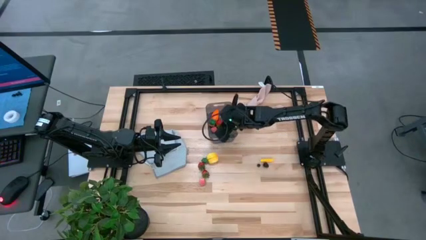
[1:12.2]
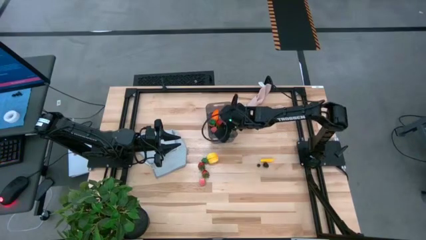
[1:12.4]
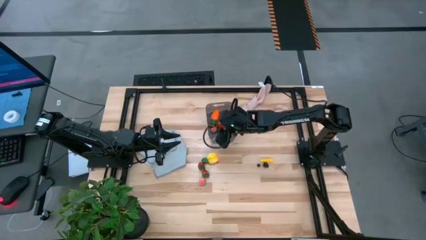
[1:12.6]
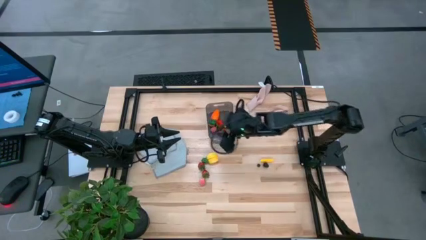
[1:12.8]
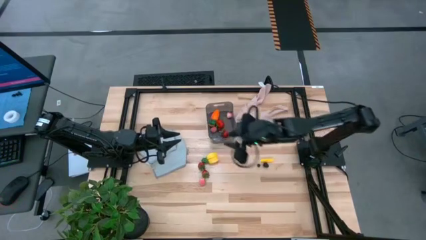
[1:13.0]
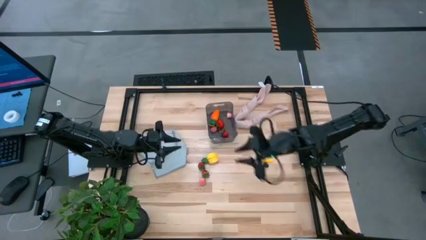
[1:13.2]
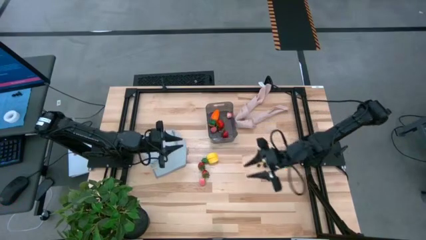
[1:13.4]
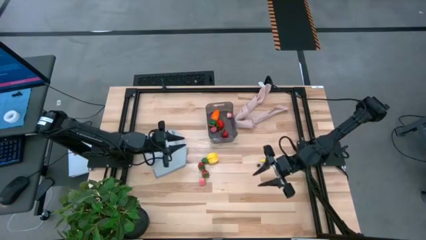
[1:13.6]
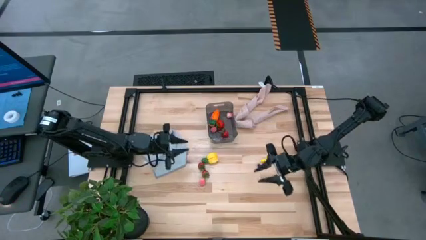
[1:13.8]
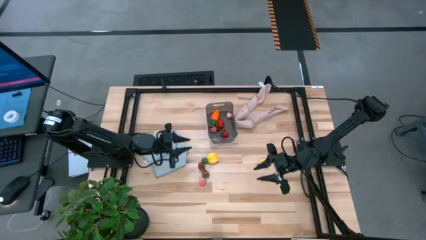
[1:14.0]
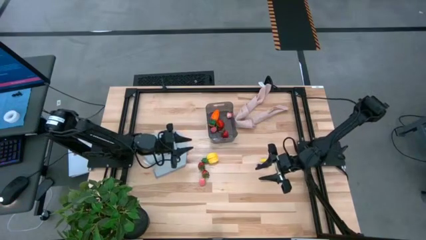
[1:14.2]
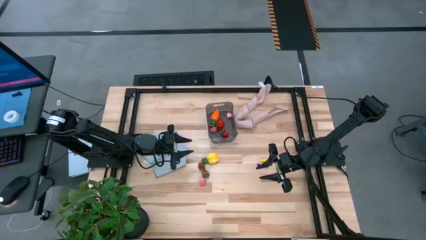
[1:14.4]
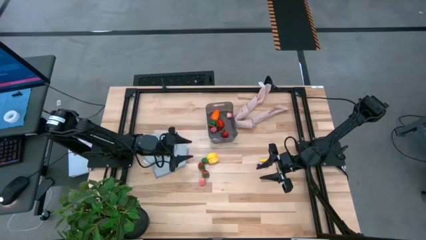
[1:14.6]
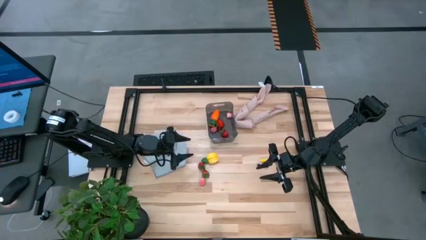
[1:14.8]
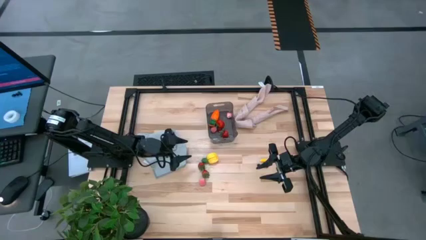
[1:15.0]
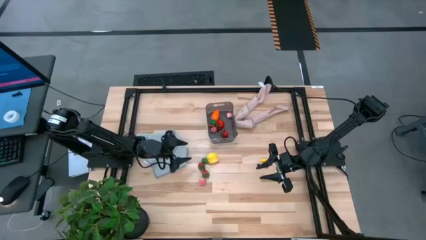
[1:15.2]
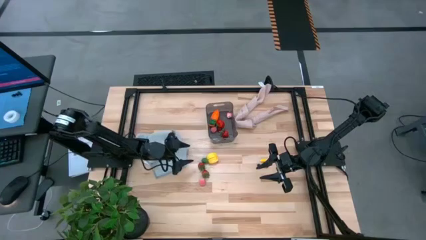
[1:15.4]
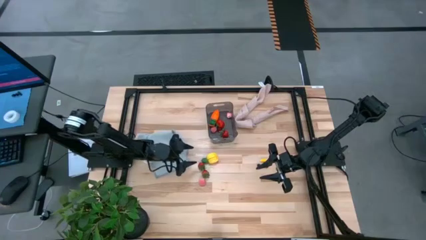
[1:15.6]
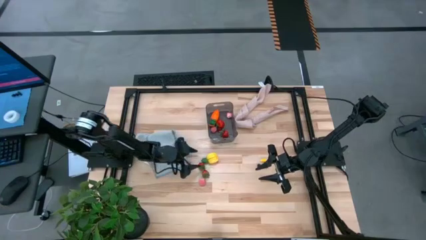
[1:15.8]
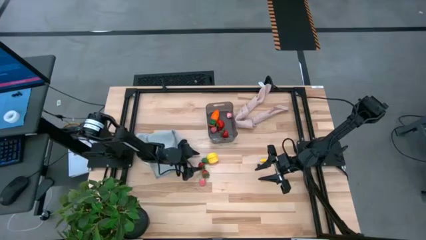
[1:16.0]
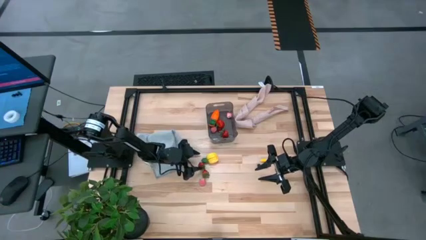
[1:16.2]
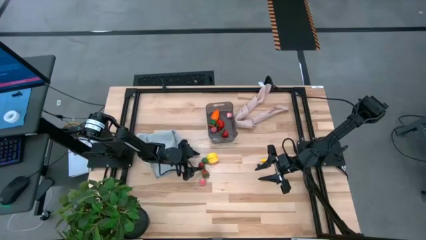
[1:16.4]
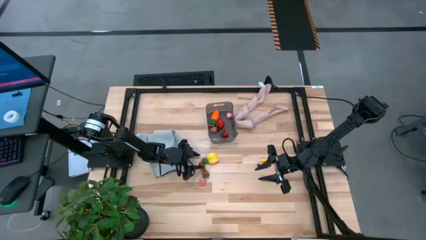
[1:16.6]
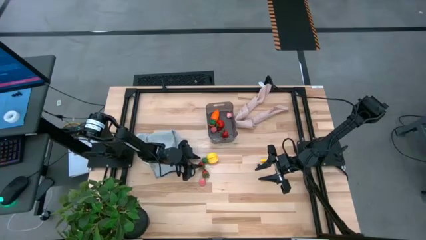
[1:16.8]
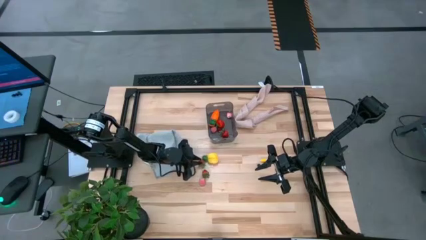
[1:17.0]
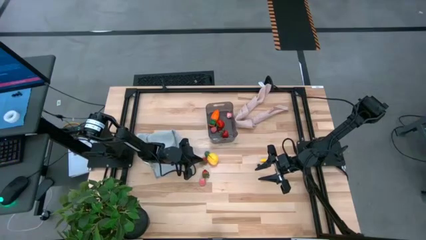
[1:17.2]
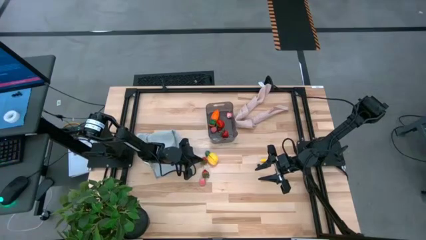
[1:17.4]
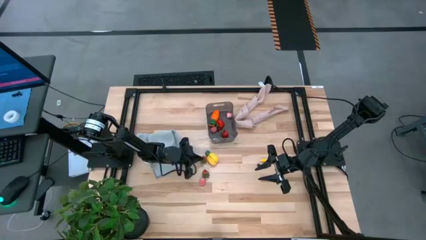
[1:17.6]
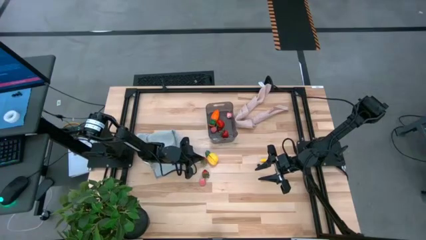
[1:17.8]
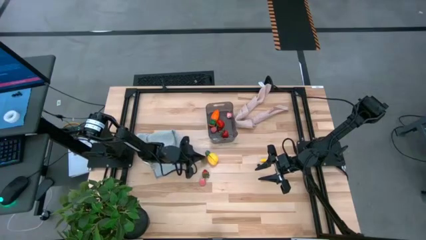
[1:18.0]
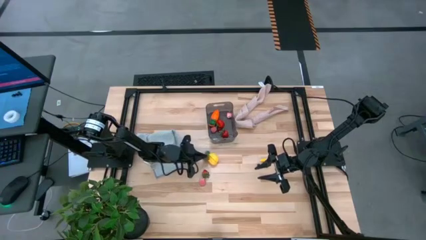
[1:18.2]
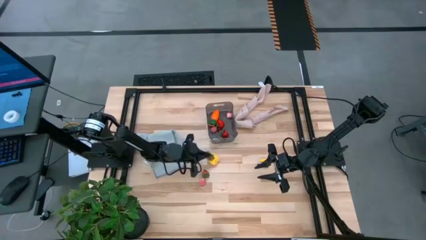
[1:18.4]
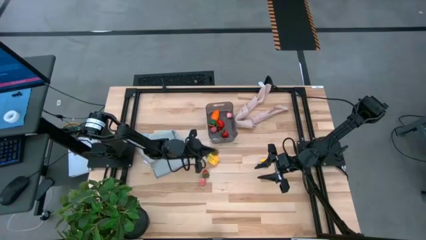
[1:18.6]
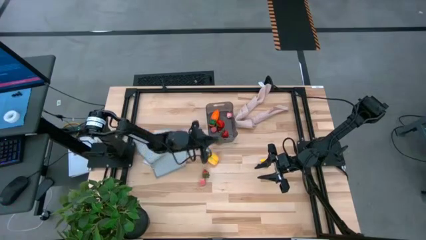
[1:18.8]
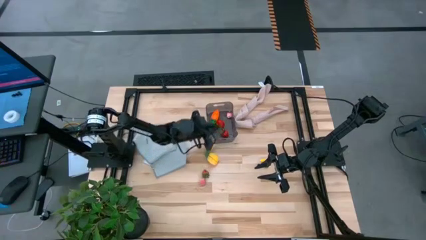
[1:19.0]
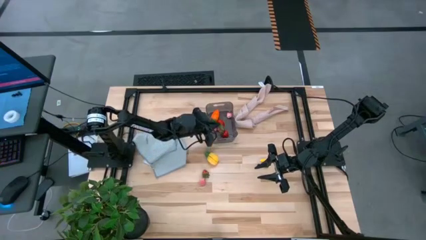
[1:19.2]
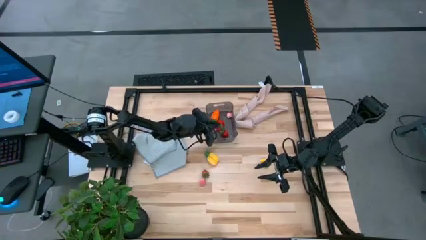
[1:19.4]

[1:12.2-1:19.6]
Task: Pick and placing Produce into tupperware
Put the red strawberry into the black bin

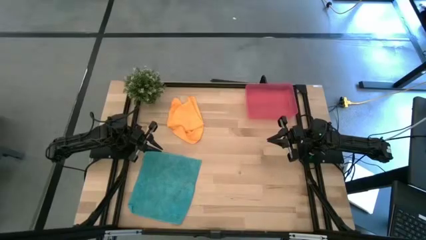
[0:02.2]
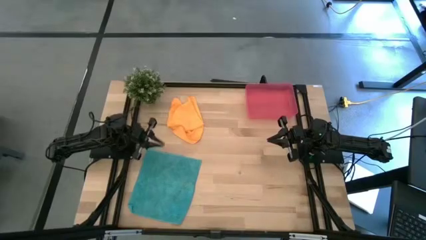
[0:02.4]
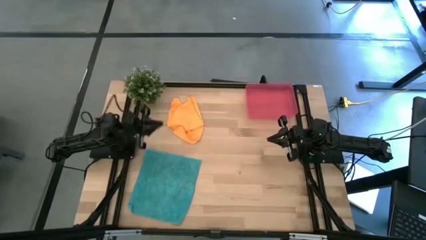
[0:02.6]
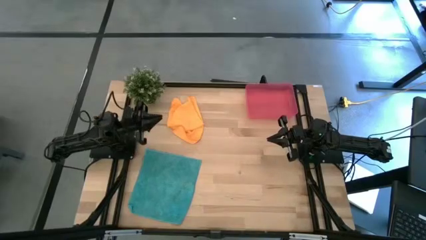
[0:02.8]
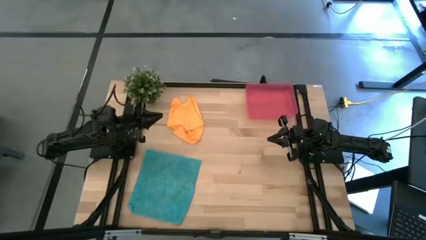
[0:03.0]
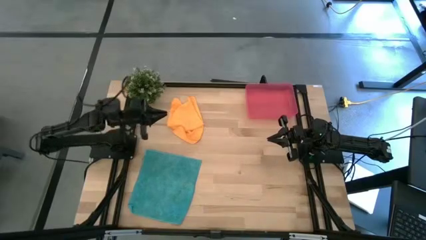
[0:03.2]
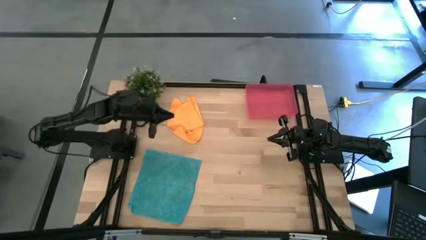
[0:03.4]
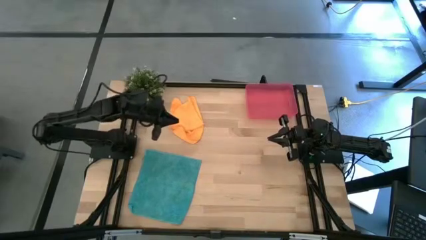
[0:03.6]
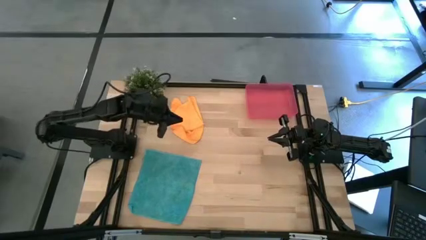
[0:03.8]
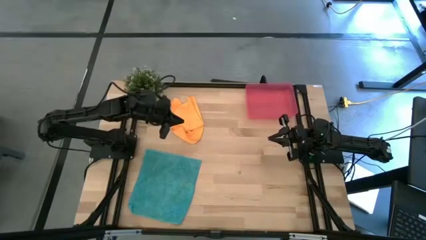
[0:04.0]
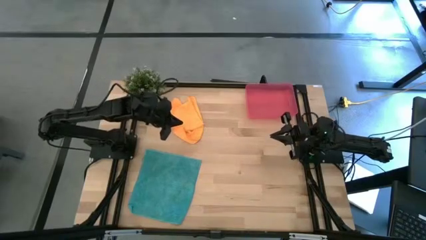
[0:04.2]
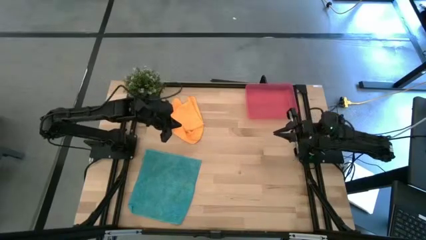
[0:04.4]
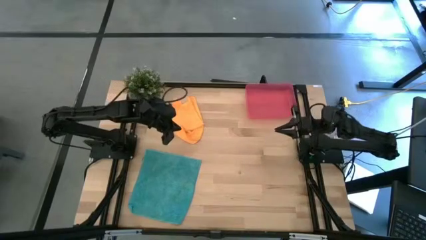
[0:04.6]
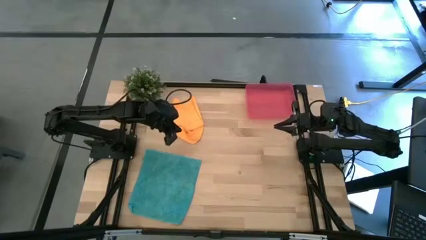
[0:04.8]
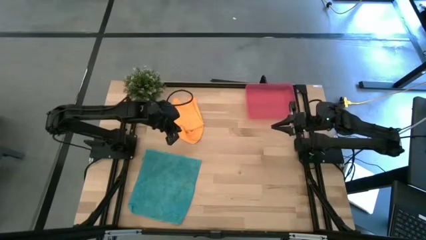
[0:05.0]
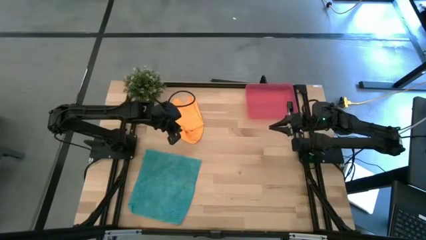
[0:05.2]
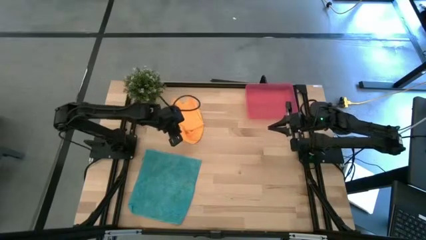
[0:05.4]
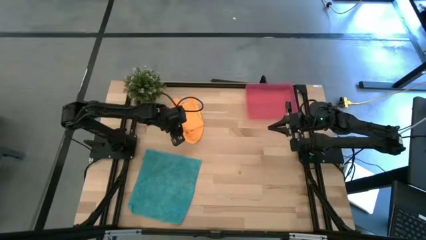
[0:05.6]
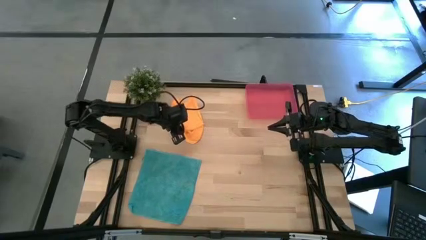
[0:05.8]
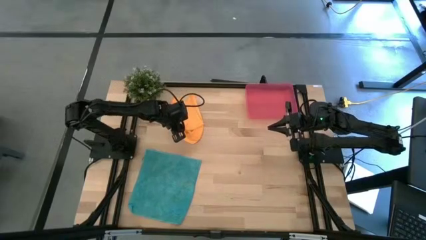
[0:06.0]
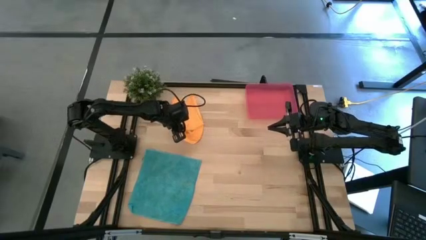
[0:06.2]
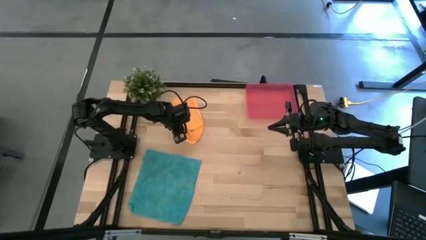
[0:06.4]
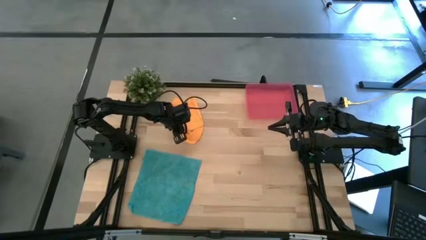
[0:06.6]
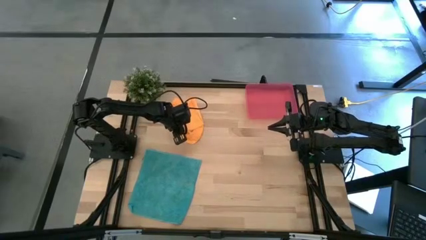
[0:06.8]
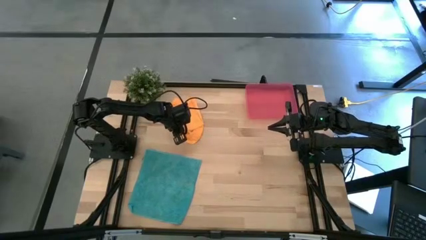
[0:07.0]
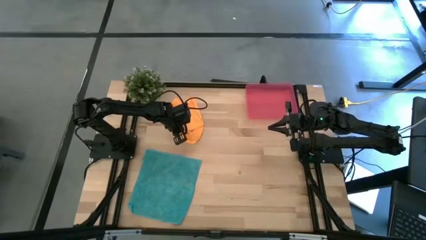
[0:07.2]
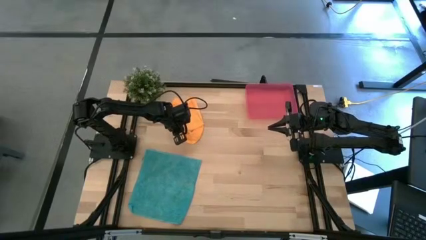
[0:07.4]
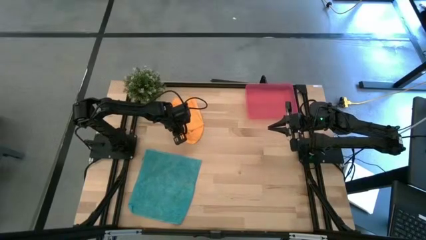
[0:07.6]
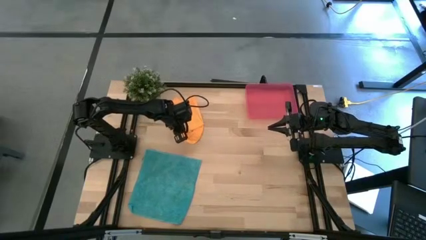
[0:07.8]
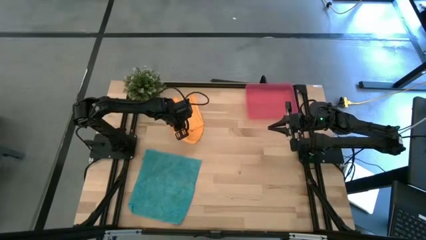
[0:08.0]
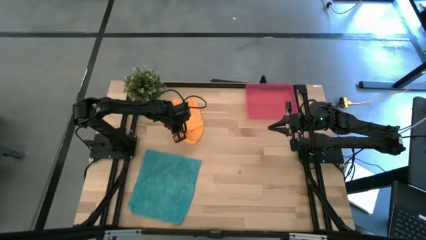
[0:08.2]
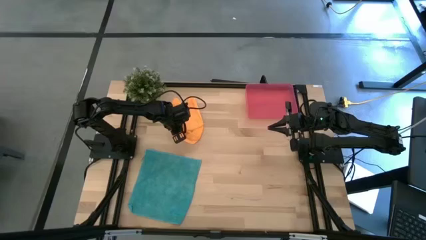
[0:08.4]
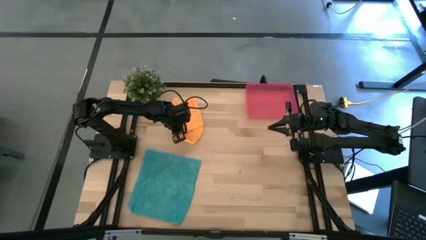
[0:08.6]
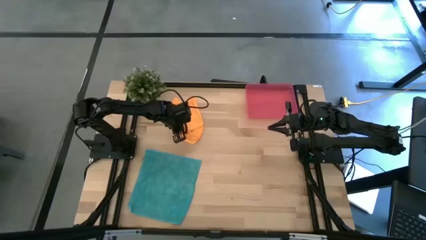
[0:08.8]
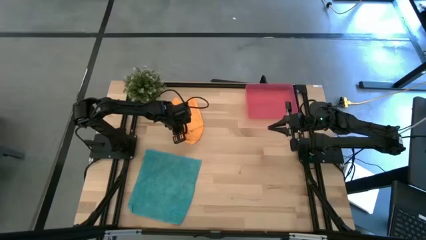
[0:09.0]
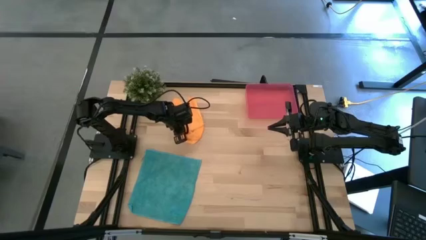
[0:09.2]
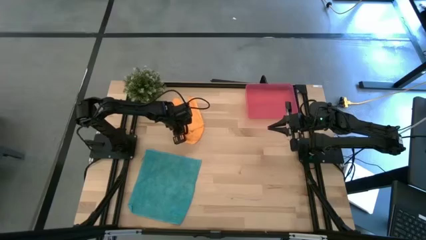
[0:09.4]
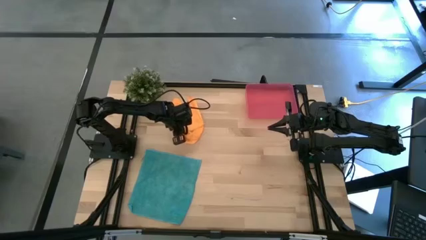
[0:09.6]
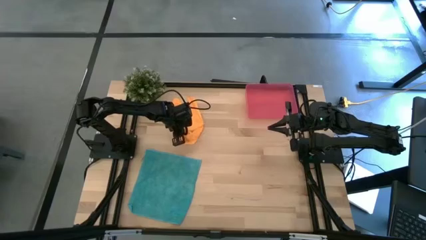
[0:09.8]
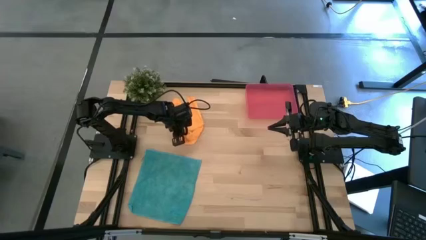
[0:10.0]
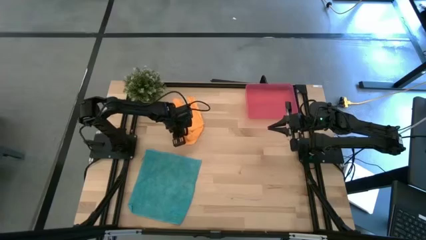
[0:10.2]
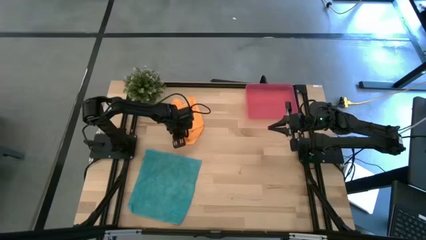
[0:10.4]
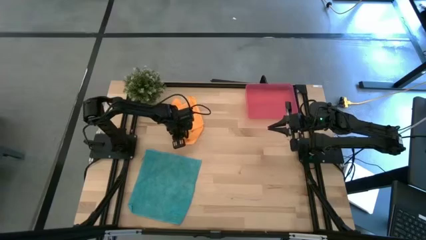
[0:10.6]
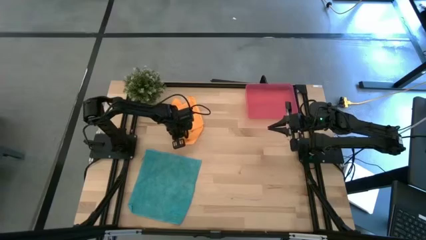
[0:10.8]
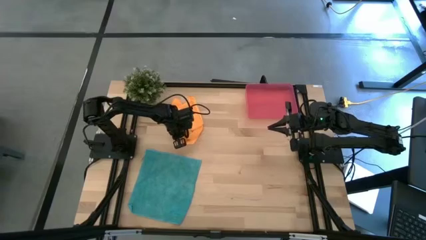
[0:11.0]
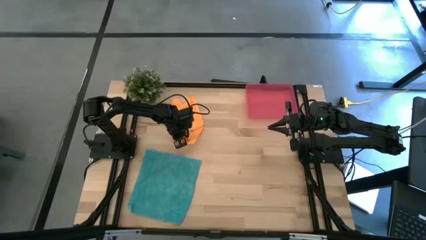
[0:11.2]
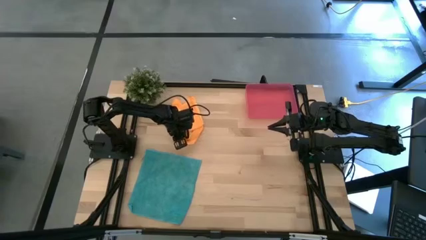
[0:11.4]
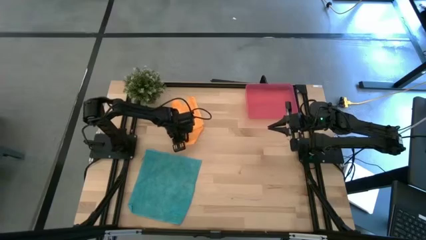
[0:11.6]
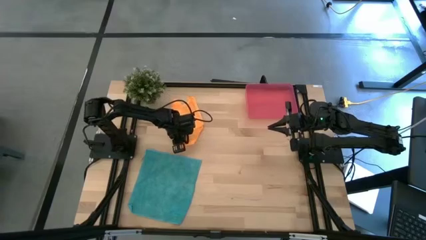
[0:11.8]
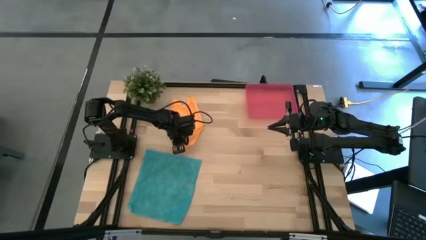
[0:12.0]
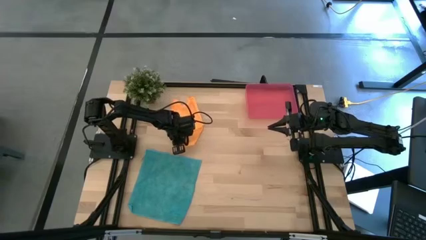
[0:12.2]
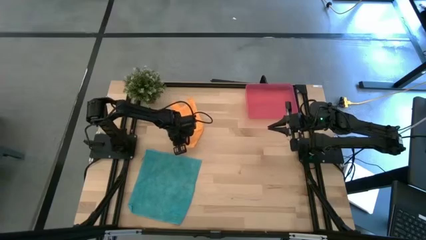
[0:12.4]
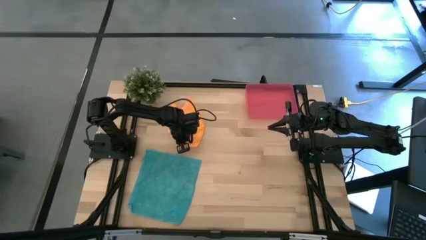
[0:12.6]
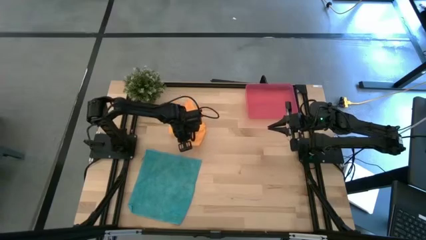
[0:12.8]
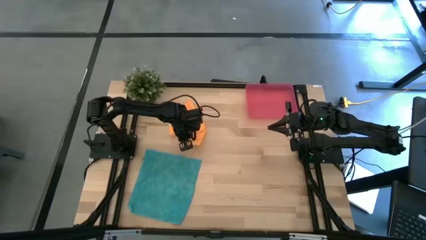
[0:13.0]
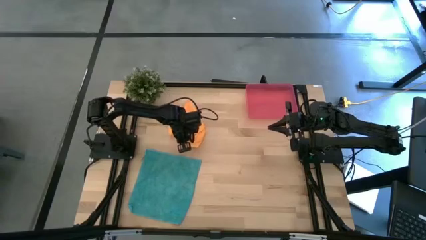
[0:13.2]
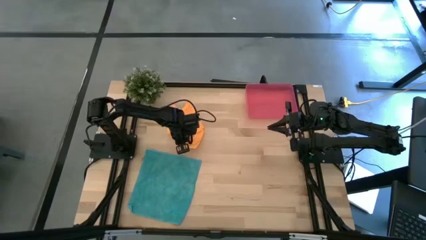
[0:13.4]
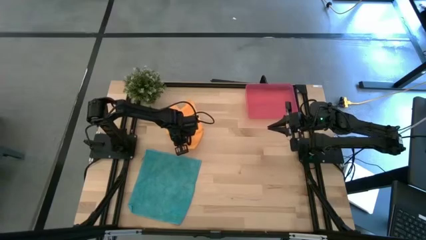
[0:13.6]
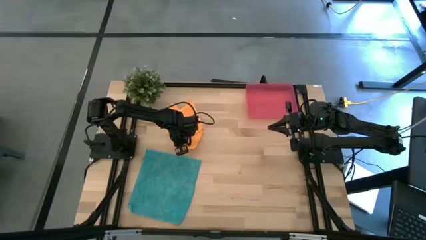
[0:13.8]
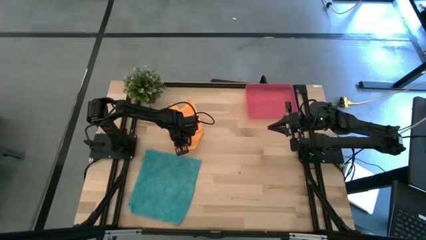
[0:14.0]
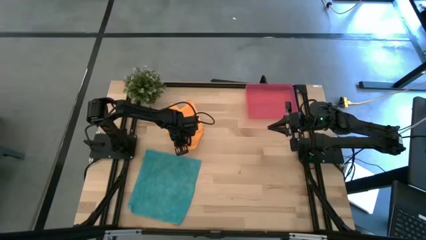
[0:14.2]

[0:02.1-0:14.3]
Task: Roll microfiber towels into tight, uniform cylinder then place into a basket
Fold the orange microfiber towel
